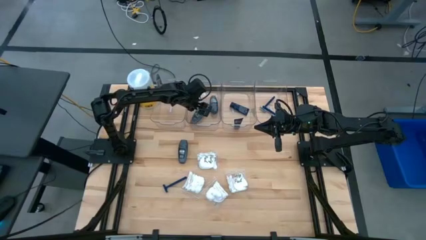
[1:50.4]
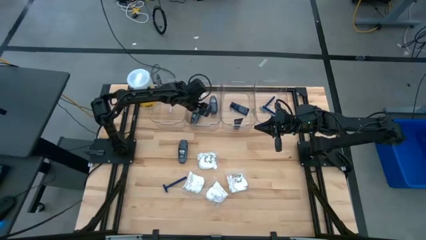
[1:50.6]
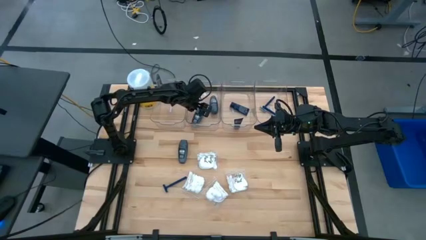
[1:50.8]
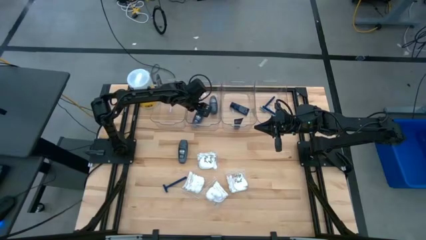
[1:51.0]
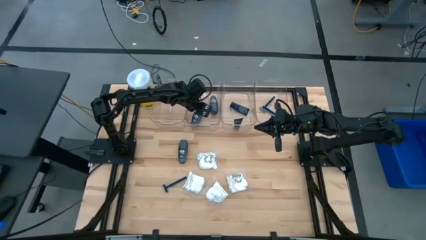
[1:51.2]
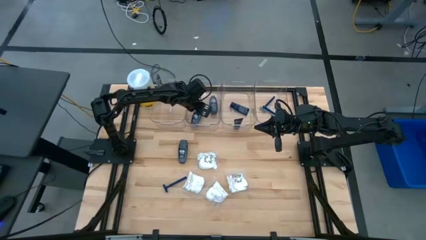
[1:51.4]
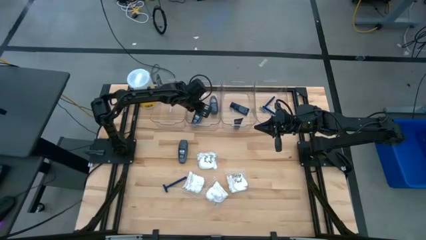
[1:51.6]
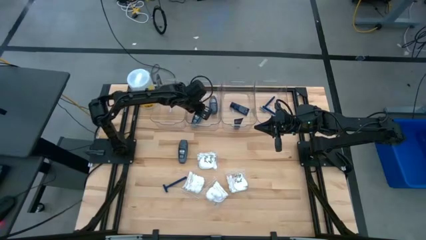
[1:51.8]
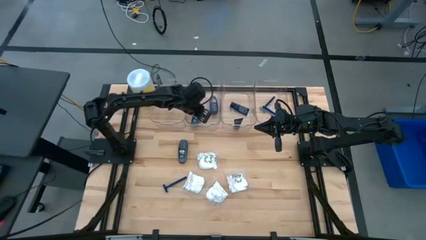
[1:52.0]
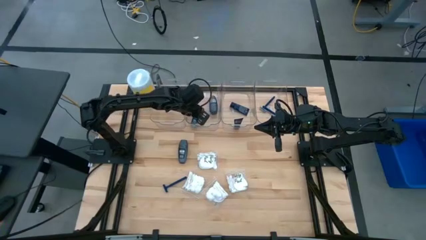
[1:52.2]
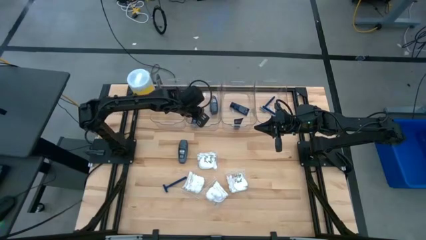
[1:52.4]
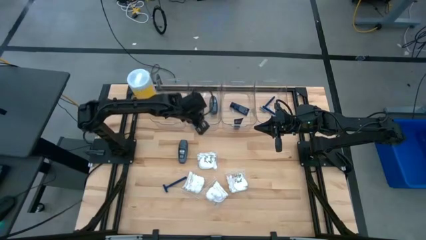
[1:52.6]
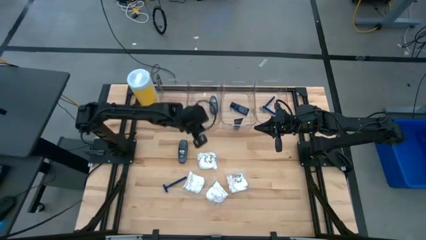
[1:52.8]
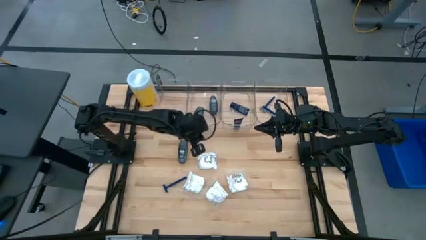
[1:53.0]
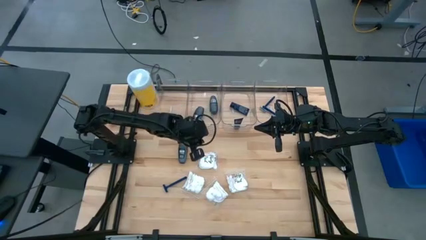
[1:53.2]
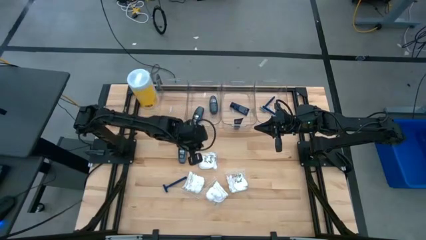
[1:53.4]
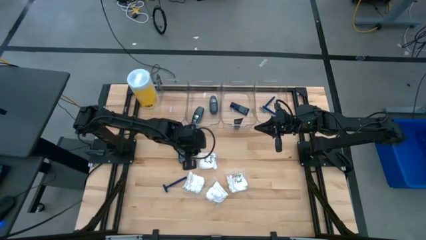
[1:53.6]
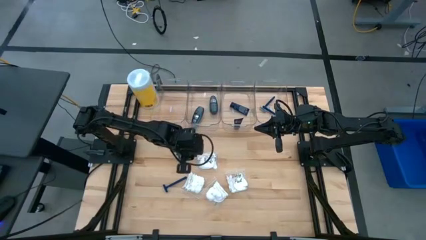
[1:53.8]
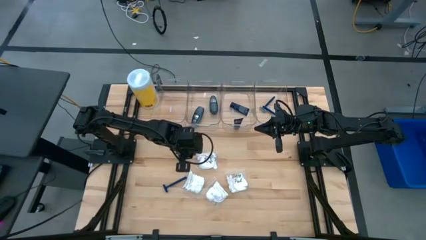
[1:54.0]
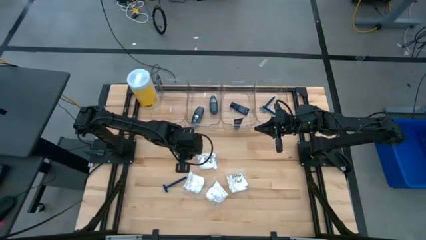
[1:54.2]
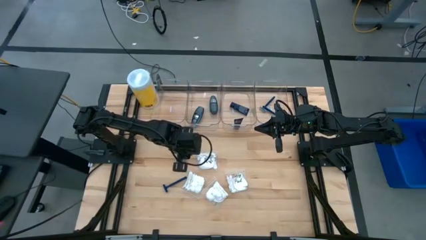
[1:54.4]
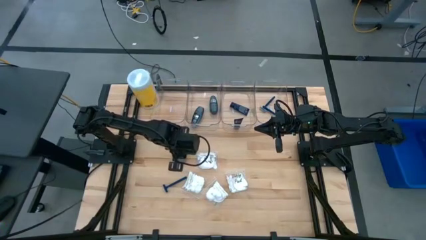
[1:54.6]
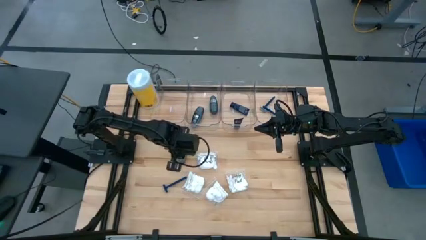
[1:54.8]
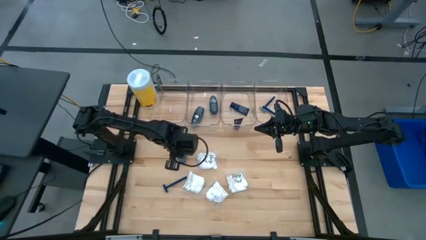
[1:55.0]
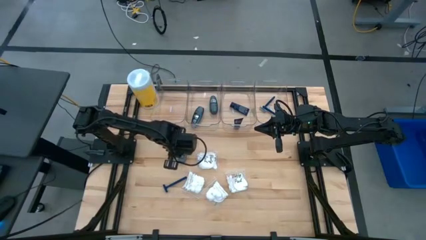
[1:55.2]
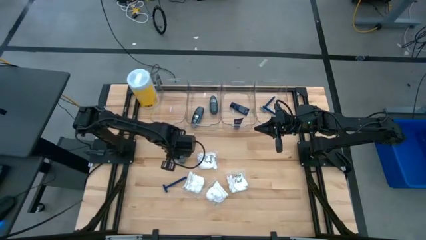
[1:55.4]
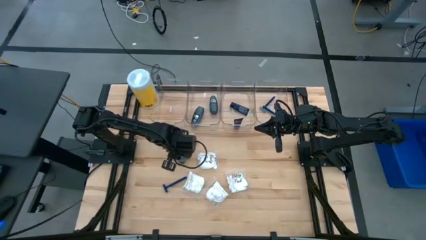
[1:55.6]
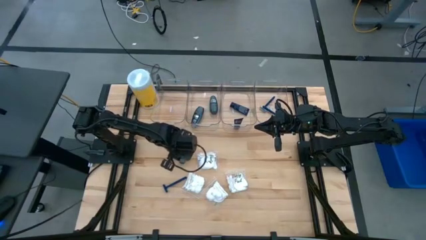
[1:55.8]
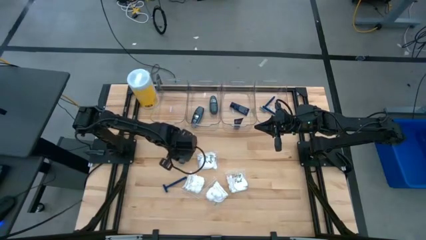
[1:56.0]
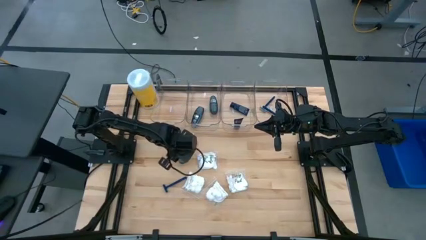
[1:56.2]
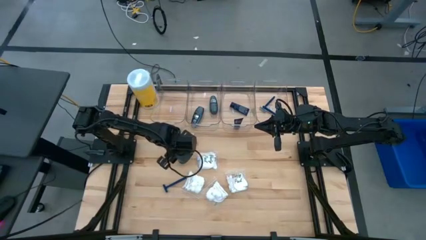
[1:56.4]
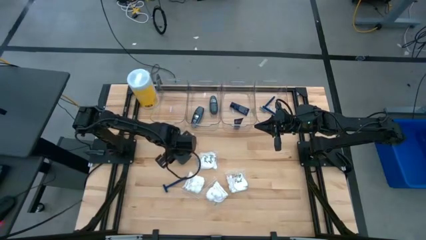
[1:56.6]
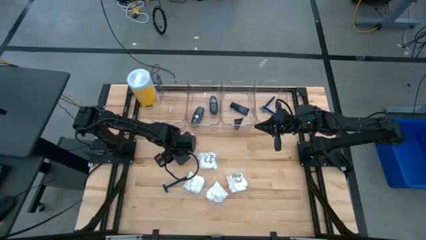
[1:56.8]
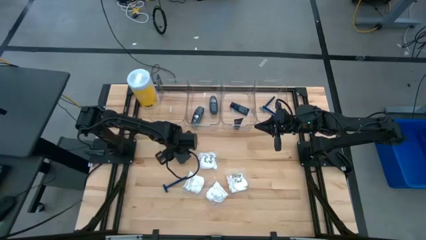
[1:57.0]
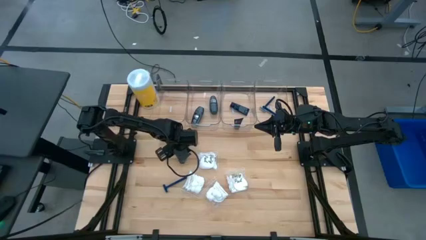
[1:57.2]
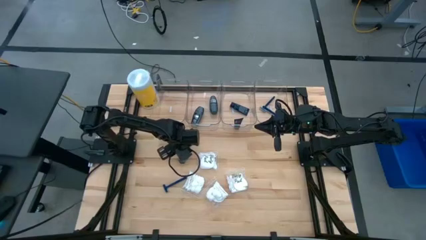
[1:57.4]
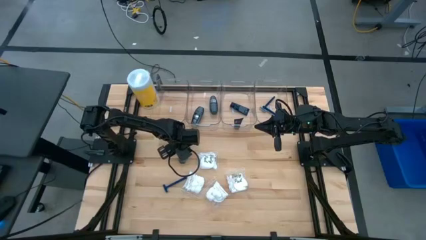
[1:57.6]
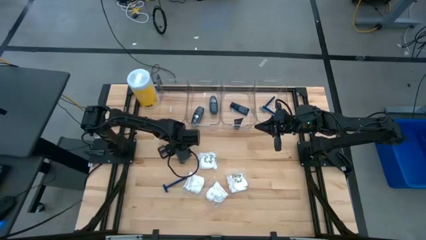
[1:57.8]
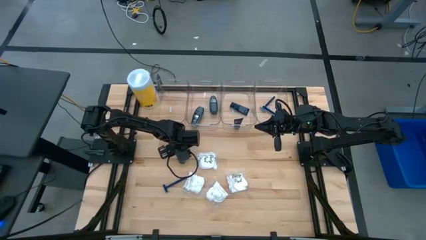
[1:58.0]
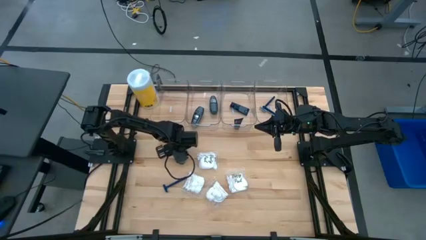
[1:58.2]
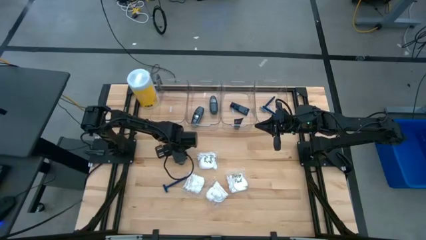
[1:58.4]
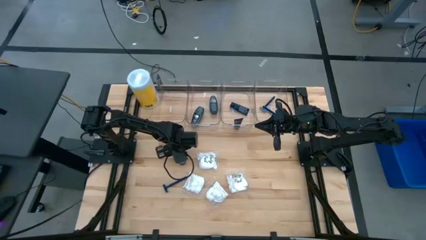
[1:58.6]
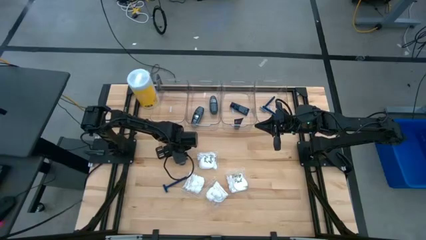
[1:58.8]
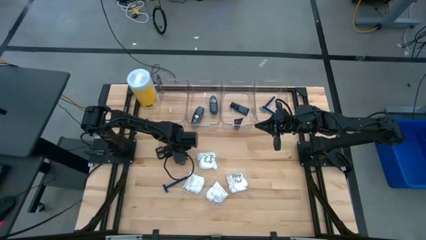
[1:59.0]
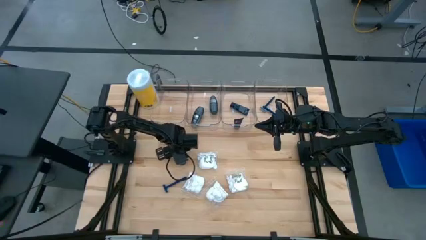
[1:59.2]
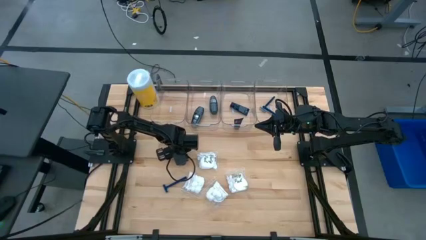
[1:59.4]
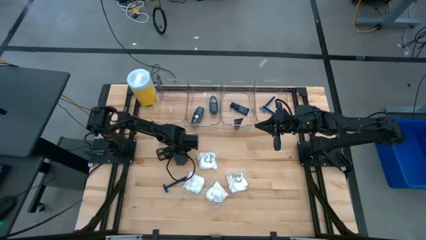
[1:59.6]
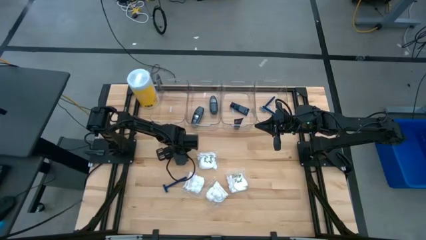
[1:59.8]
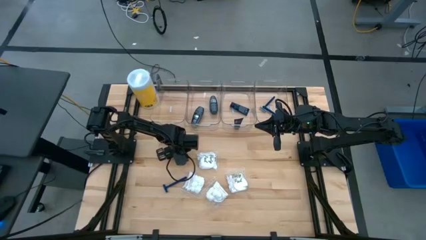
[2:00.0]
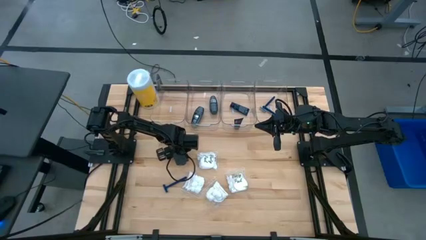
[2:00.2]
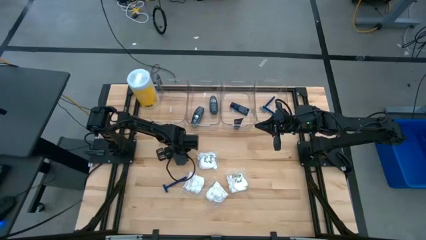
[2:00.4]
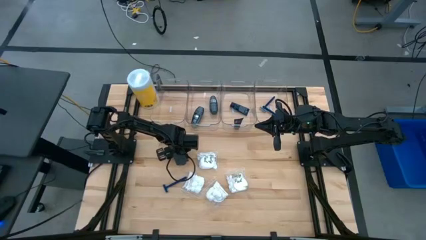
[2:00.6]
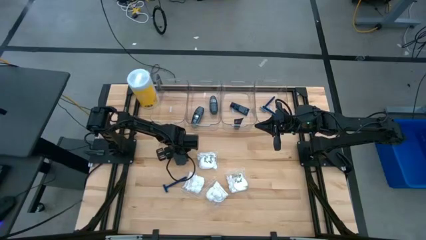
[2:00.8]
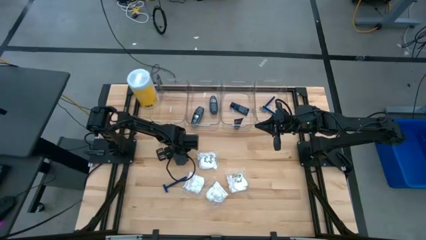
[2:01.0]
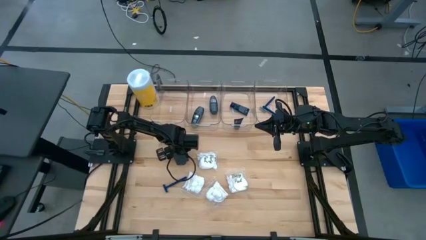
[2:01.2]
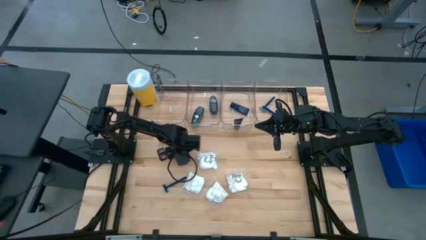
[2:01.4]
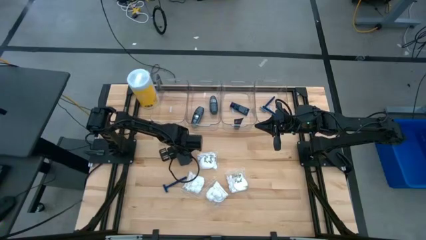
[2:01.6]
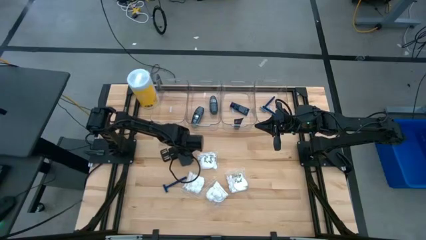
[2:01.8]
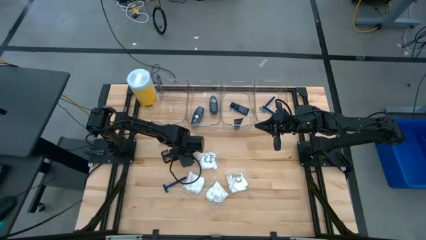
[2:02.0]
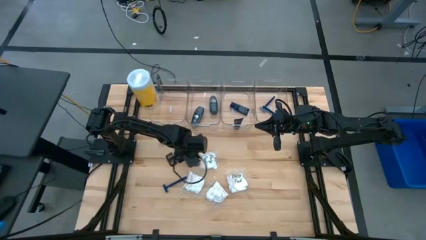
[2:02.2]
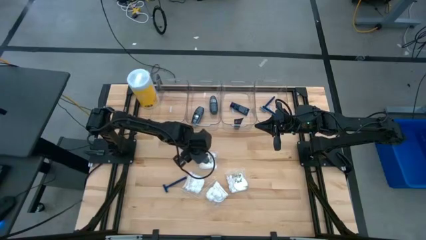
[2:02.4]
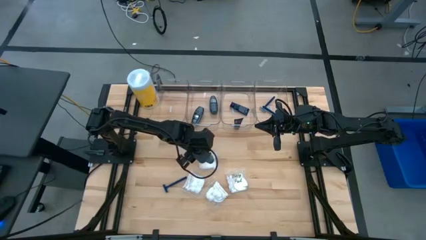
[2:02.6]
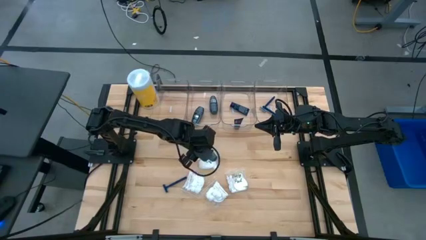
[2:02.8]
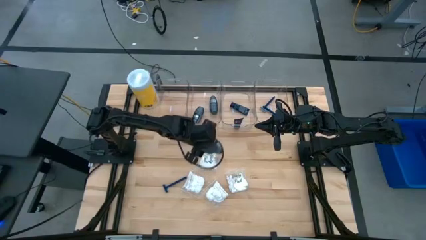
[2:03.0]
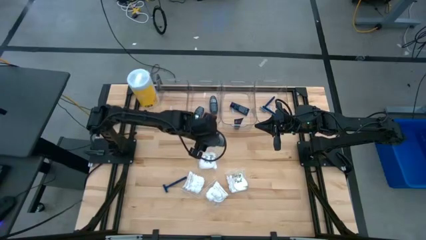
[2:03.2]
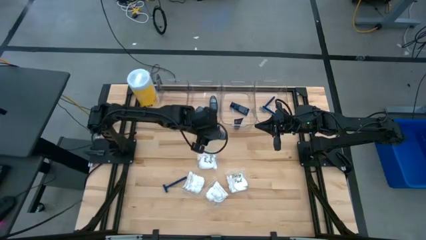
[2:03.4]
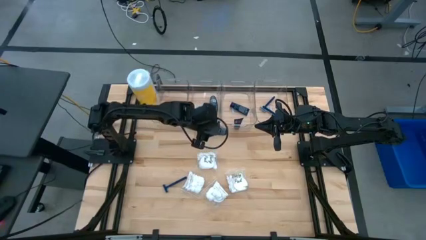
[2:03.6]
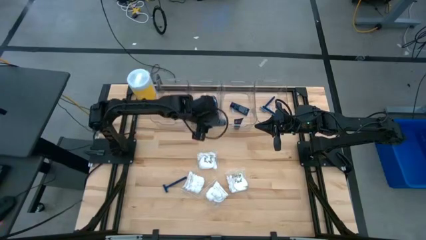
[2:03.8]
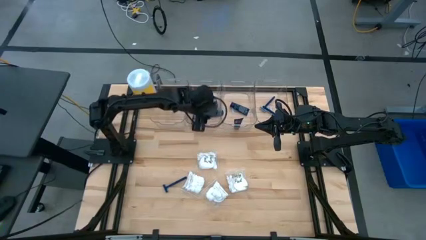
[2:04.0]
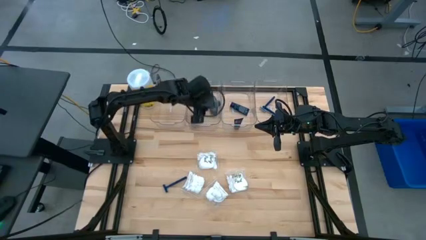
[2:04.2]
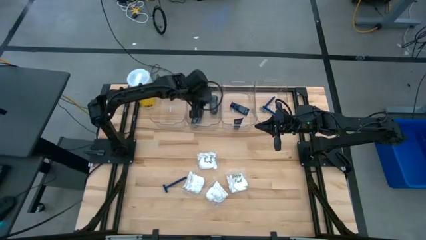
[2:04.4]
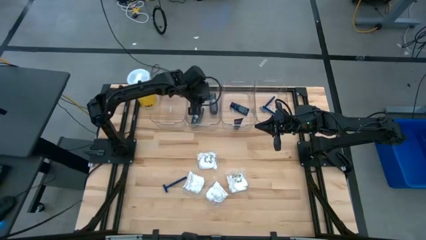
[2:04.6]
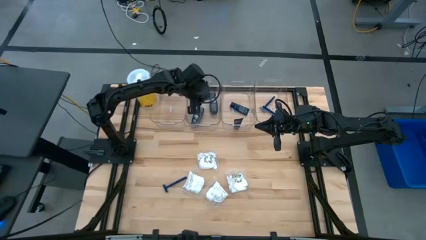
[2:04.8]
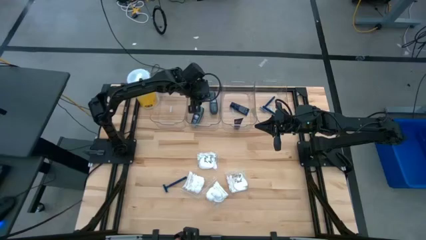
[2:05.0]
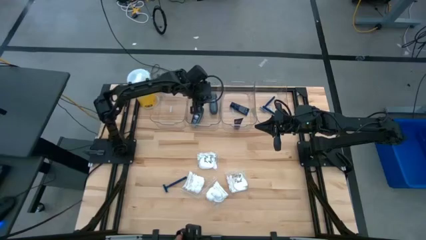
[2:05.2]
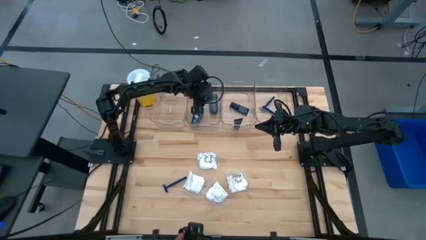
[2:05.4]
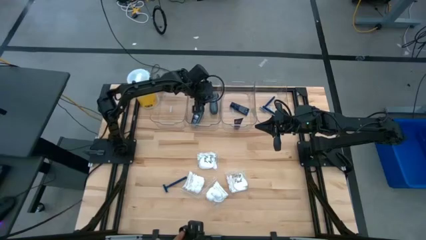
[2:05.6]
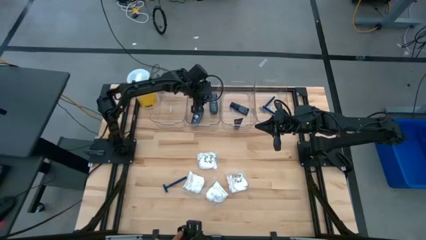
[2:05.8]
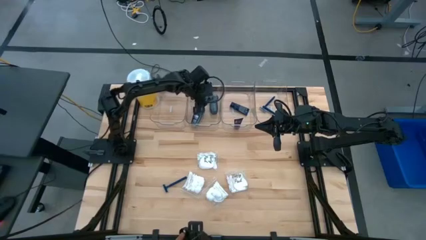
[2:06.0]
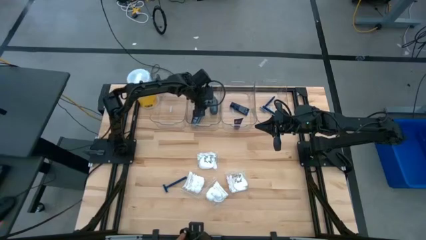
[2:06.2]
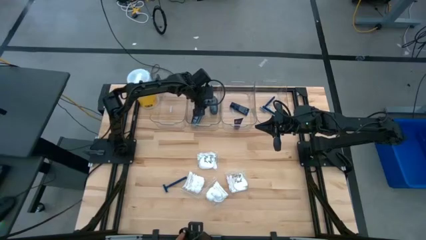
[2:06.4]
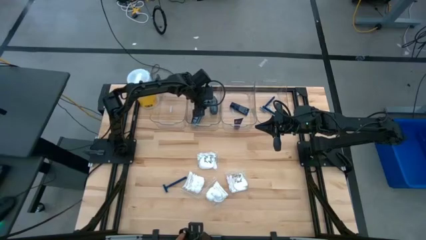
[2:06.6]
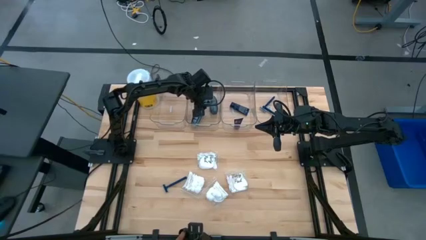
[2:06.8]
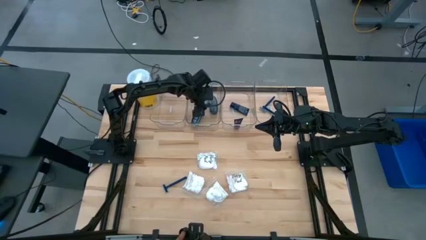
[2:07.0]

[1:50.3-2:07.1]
Task: Pick & Place Travel size toiletries
Put the black deodorant into the middle left transparent bin
